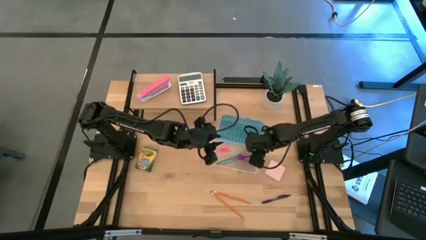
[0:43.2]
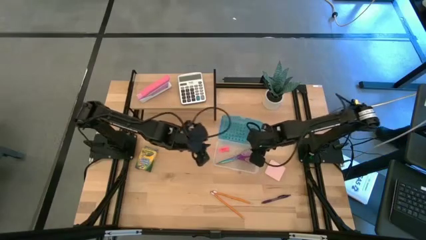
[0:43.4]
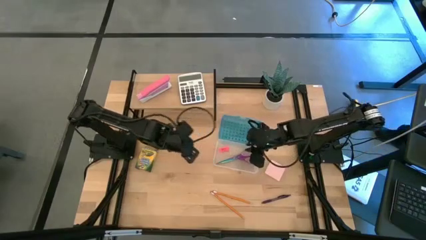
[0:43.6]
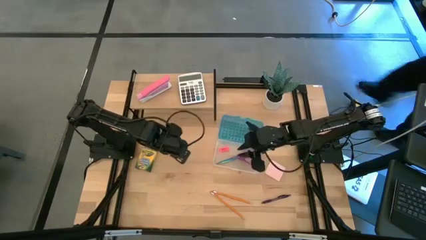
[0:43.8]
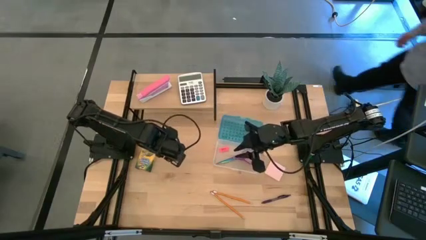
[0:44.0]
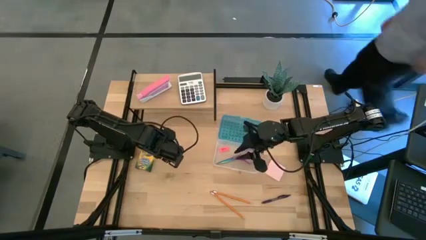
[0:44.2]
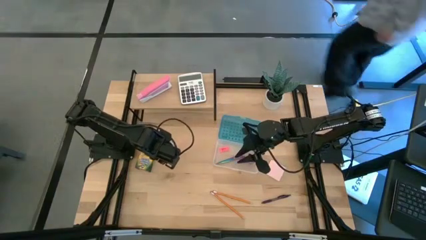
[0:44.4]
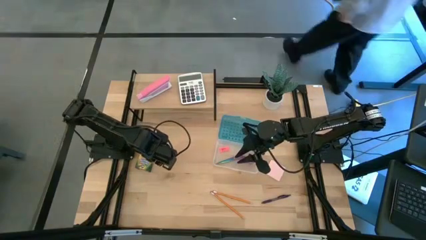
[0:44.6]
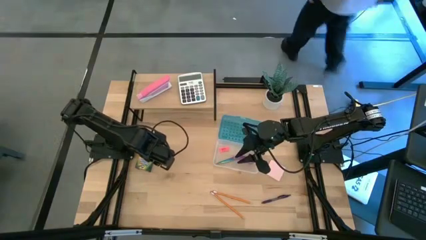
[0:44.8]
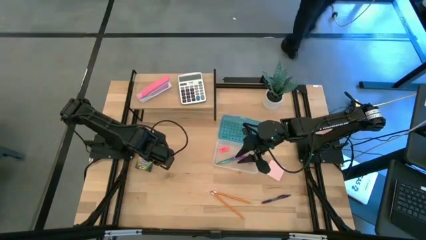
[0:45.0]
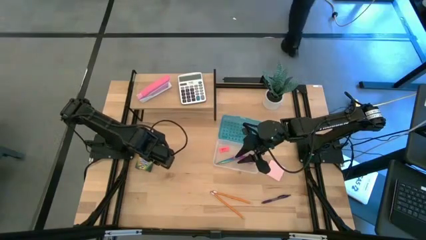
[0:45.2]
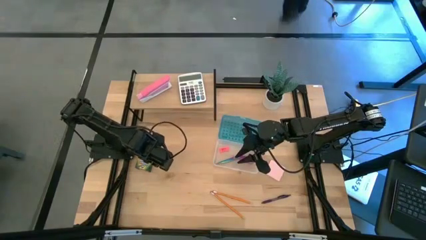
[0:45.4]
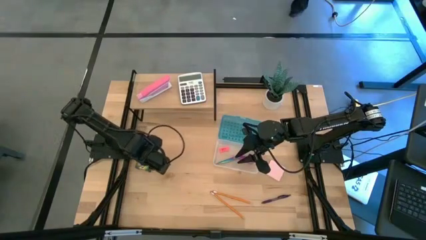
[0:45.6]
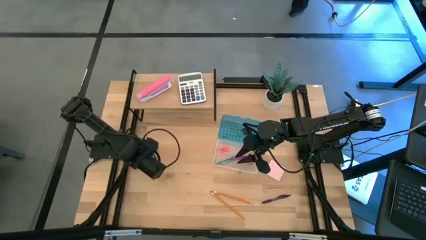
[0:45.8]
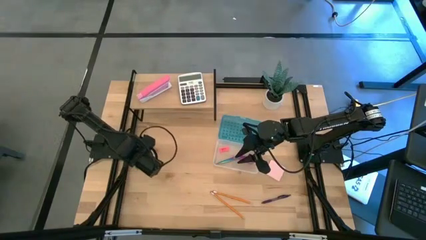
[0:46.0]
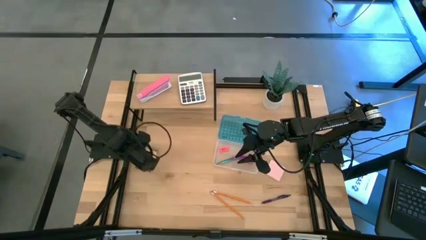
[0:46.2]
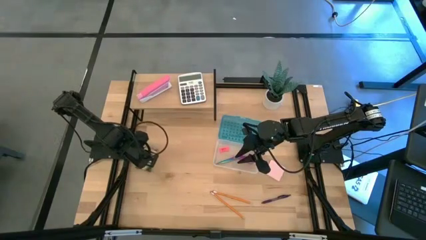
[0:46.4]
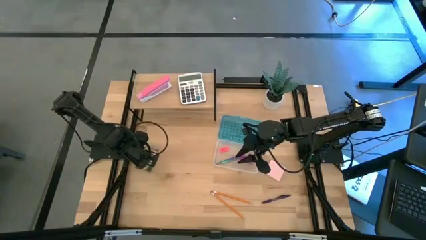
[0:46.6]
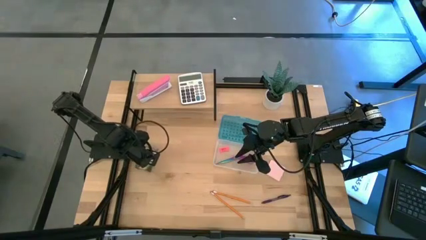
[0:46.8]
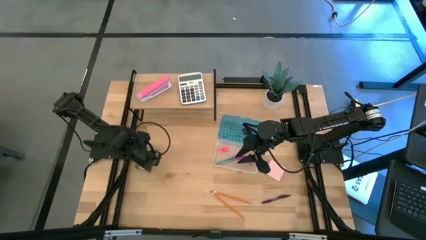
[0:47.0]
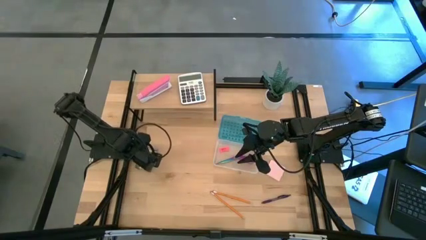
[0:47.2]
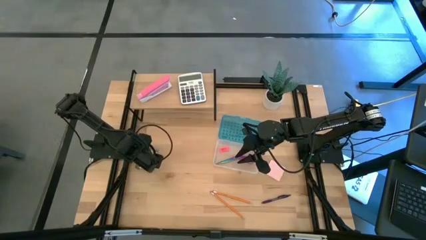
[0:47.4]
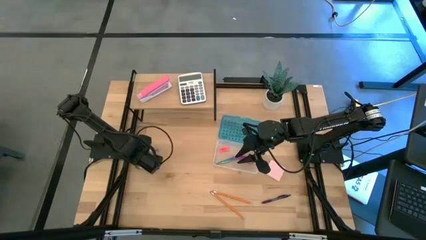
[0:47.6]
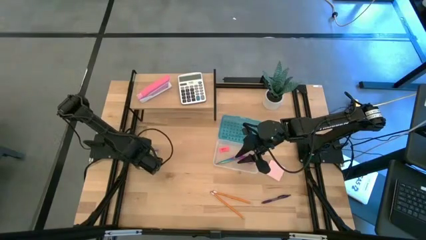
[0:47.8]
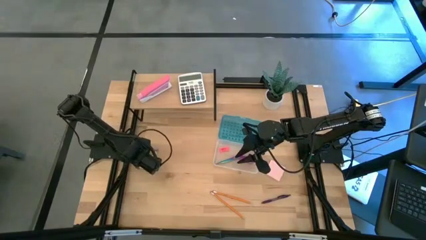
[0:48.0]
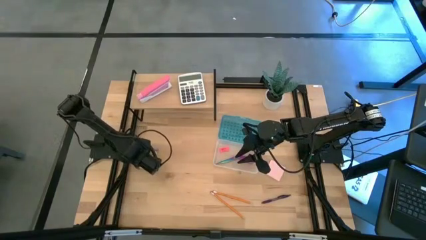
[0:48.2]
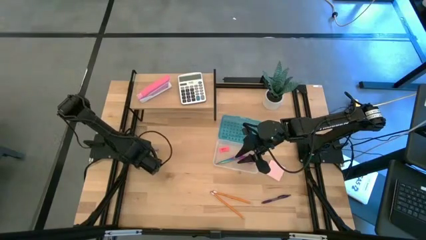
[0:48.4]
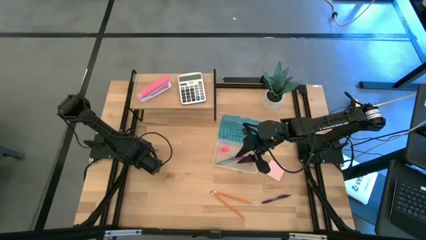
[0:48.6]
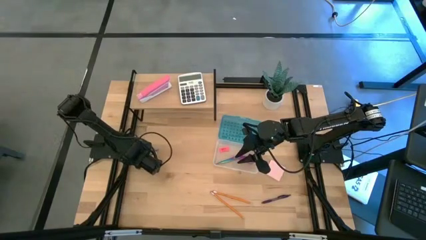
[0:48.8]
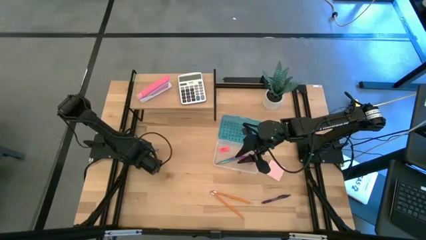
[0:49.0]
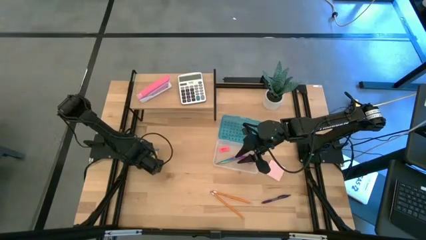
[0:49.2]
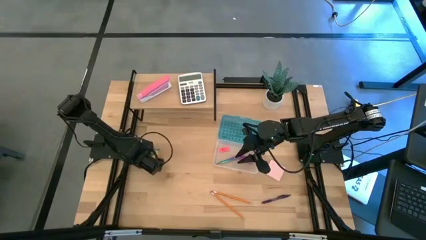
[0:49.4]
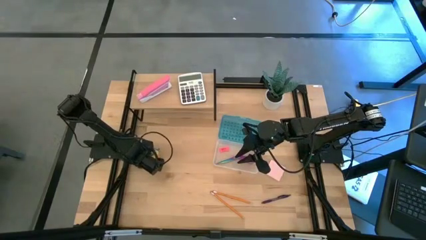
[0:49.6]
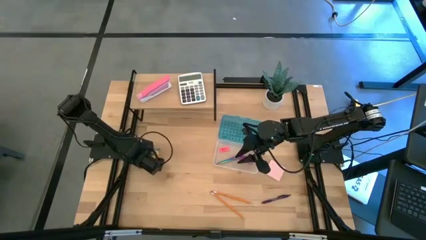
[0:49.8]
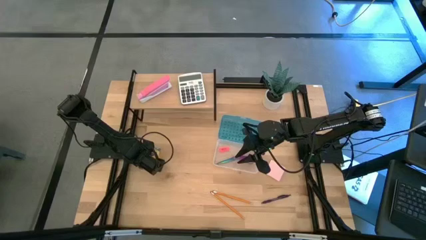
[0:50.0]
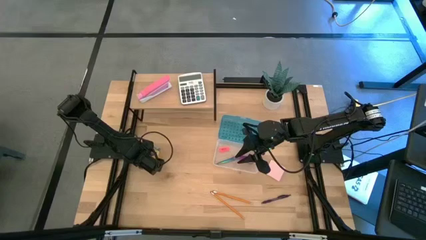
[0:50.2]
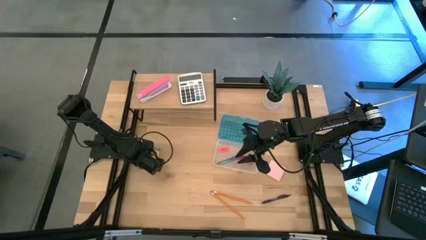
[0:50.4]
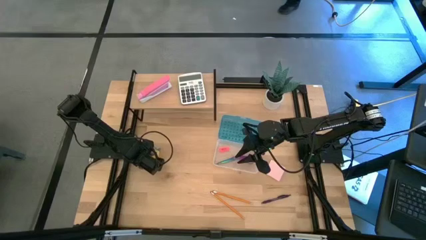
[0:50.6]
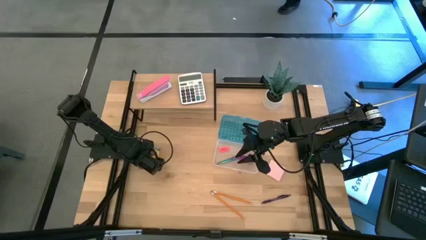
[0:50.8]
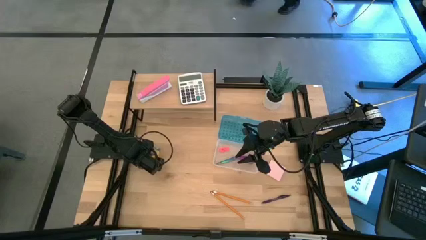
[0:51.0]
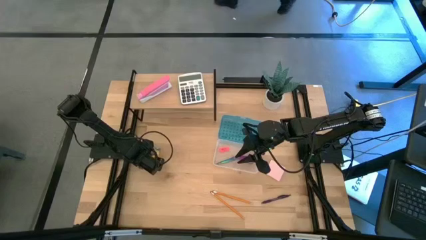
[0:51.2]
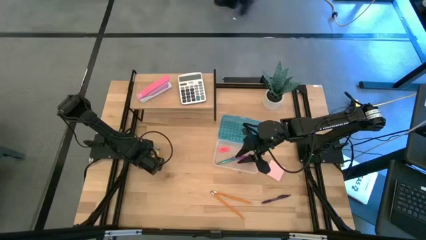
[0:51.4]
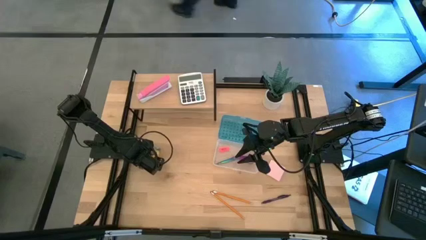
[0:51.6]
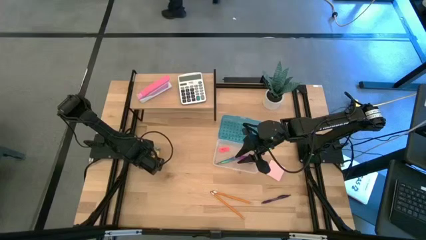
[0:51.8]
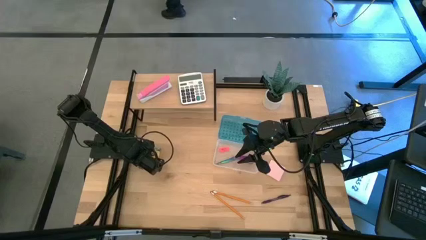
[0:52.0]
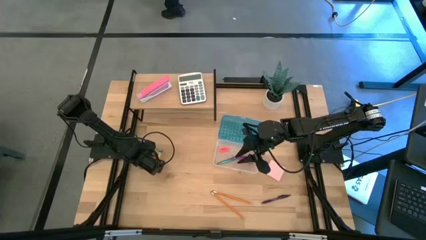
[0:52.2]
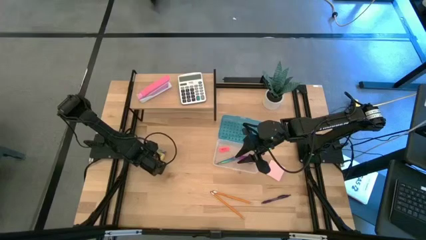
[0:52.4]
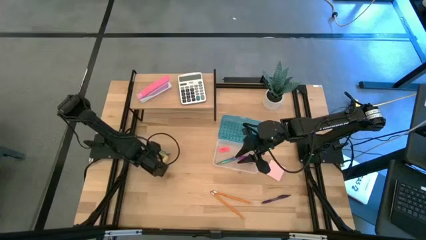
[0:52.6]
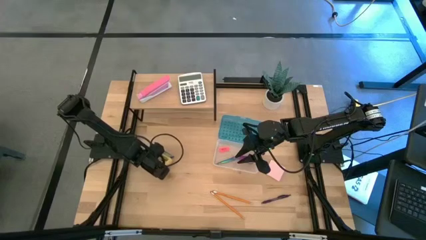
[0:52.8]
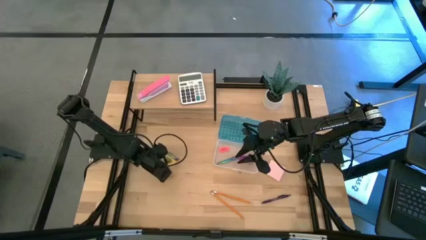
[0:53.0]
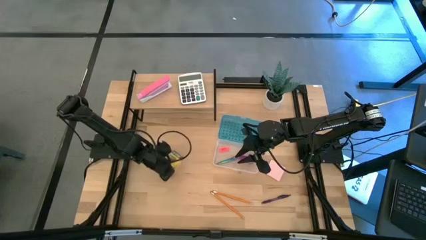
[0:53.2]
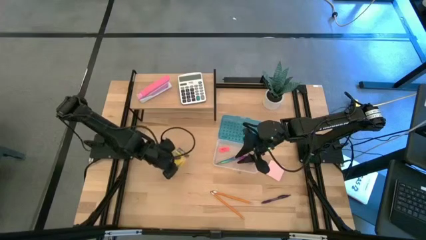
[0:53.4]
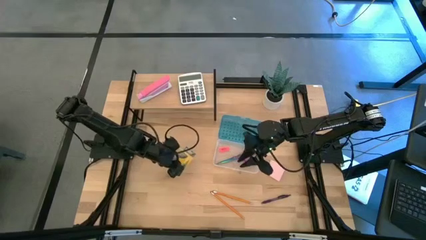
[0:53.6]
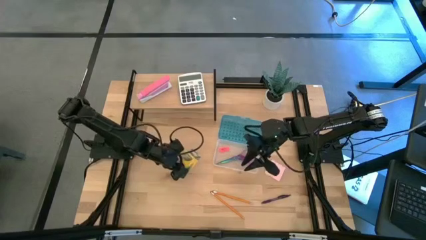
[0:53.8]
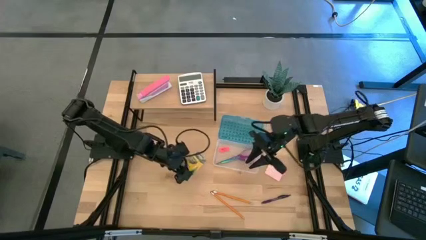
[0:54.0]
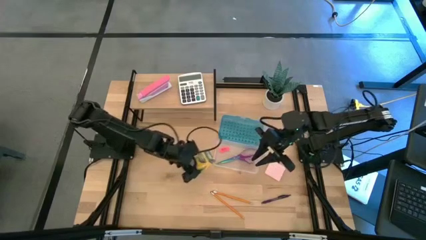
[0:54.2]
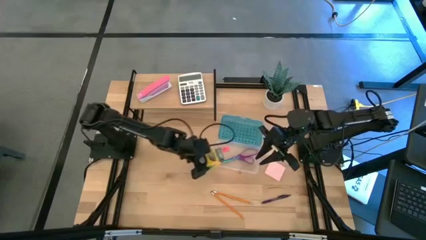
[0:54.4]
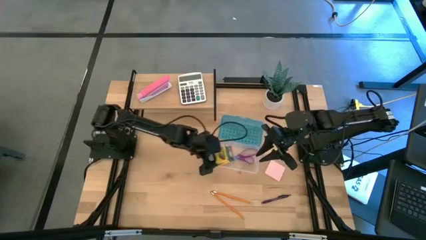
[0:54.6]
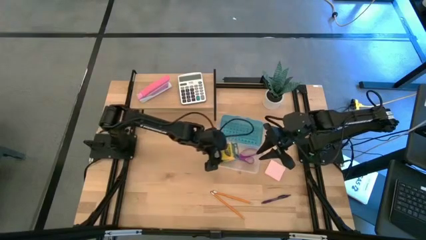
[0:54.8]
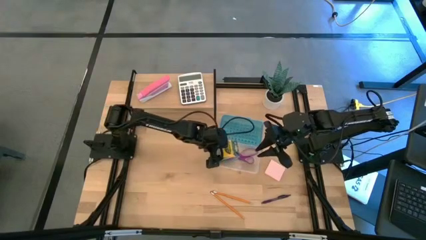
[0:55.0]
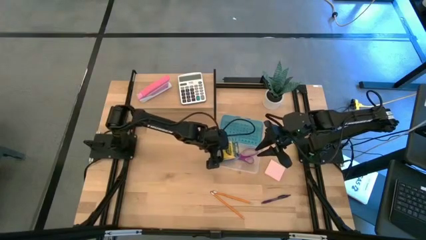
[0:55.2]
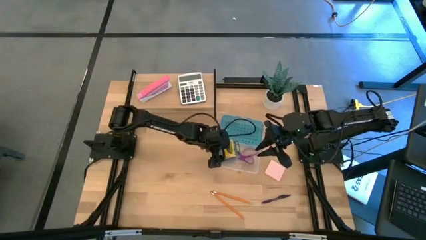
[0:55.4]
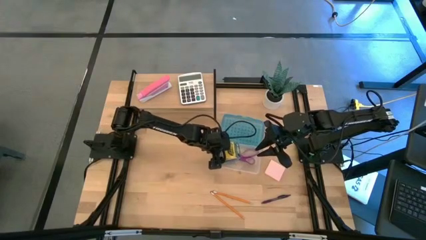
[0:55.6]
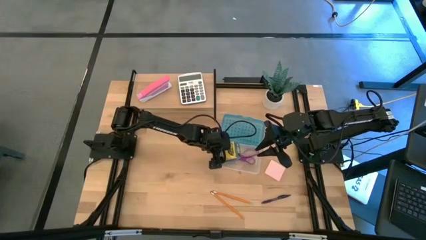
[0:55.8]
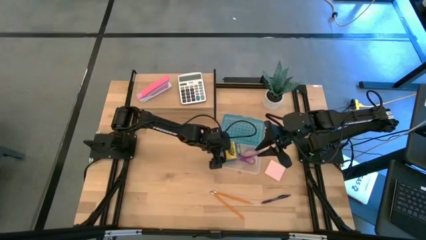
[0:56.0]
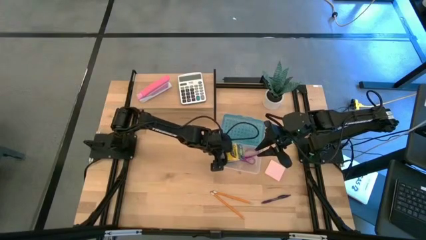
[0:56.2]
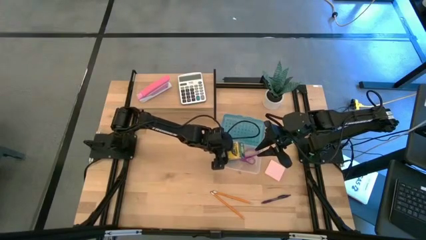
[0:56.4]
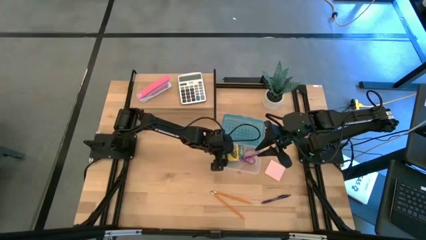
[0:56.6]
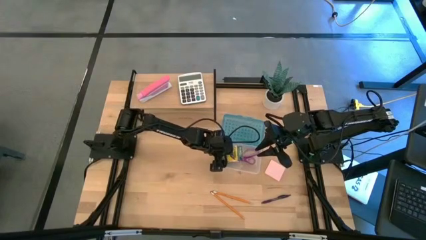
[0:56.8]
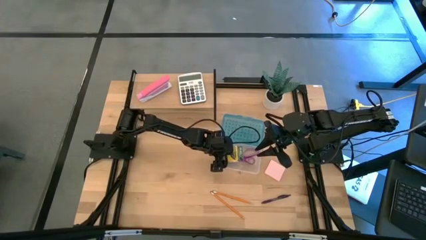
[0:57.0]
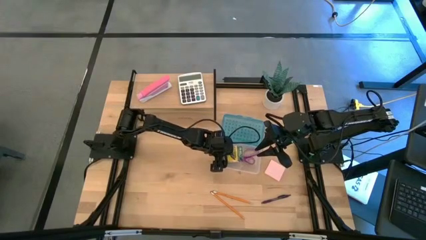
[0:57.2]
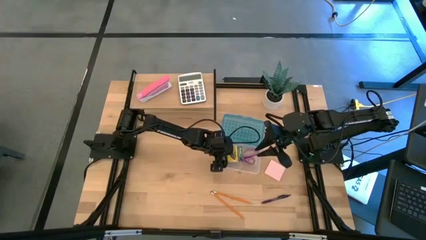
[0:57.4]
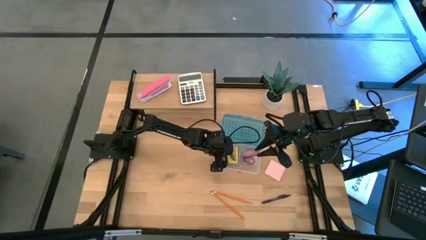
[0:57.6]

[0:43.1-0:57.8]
Task: Pack school essentials
Put the crayon box into the supply box

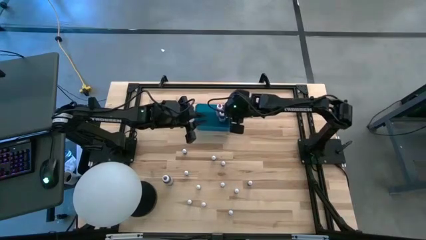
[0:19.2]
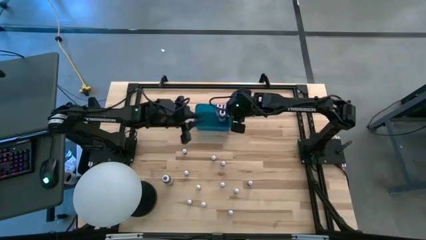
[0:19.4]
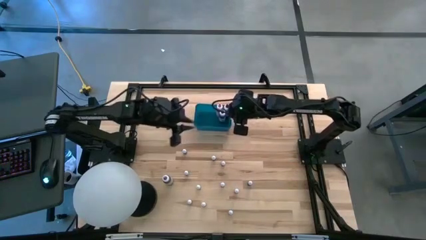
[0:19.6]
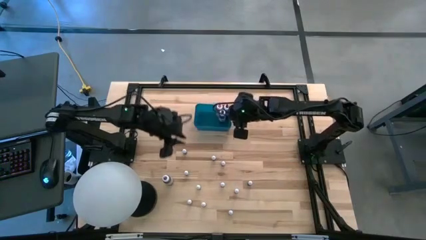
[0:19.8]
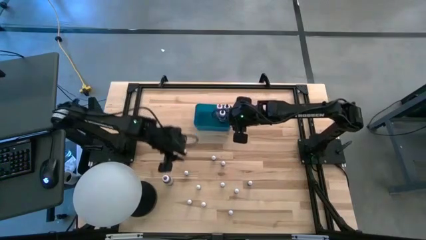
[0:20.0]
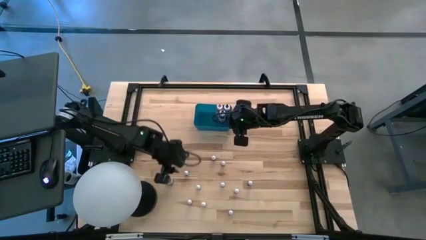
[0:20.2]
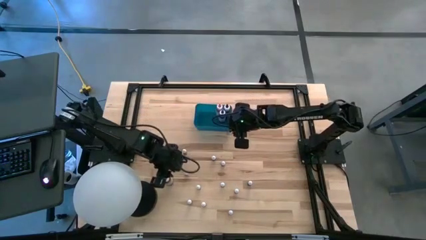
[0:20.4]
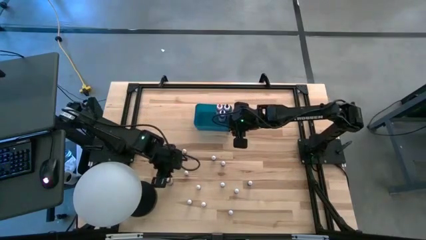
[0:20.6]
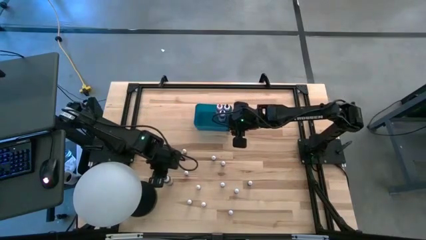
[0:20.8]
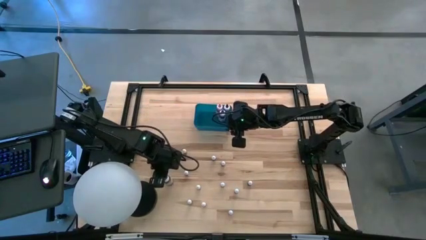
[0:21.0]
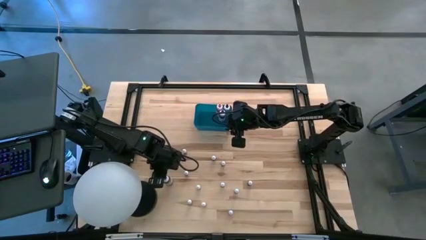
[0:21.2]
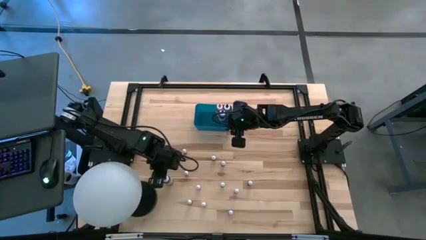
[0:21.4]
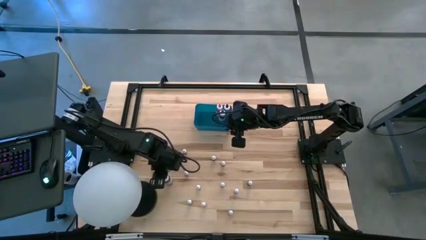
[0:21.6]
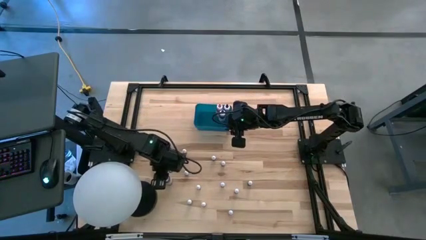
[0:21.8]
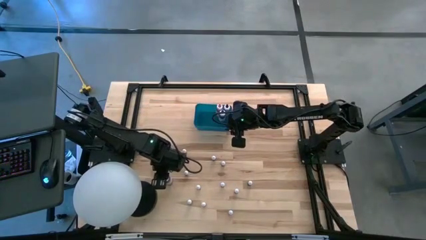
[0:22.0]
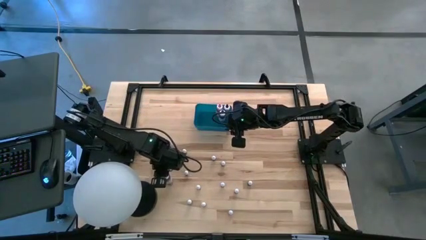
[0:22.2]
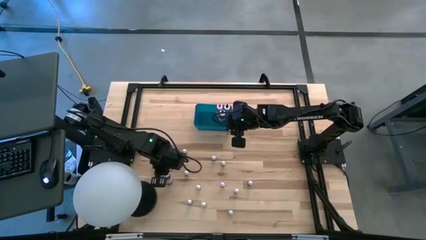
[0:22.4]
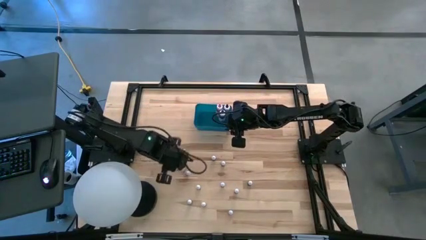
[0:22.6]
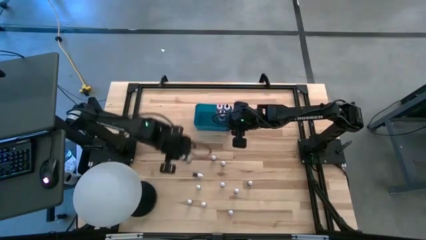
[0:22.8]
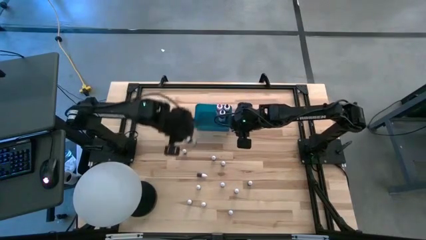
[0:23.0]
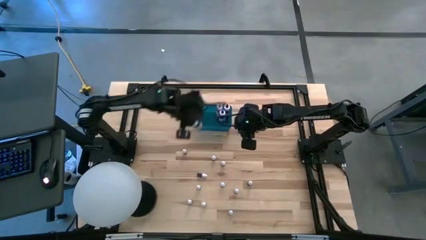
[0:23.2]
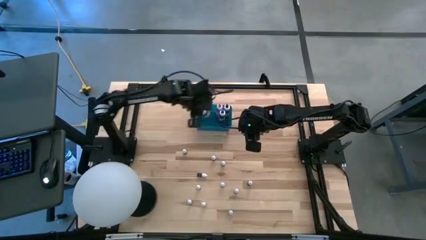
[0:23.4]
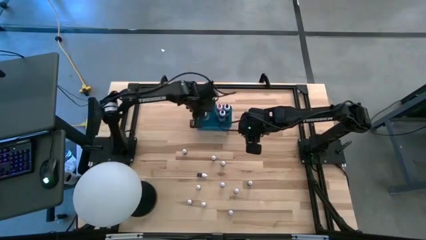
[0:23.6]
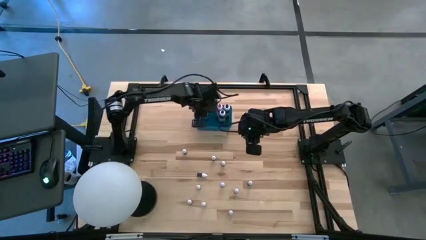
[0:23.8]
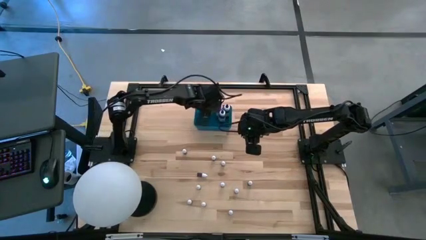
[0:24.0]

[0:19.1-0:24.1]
Task: Pick & Place food coloring
Put the purple food coloring bottle into the blue bin
